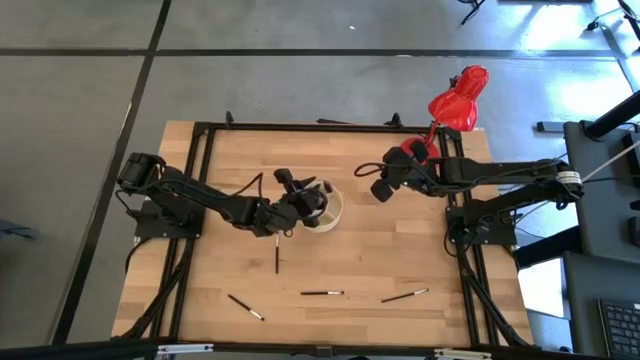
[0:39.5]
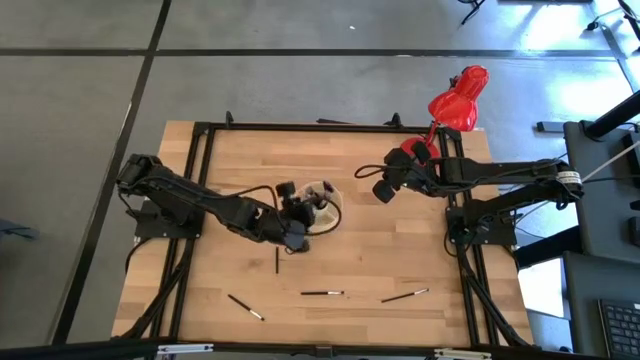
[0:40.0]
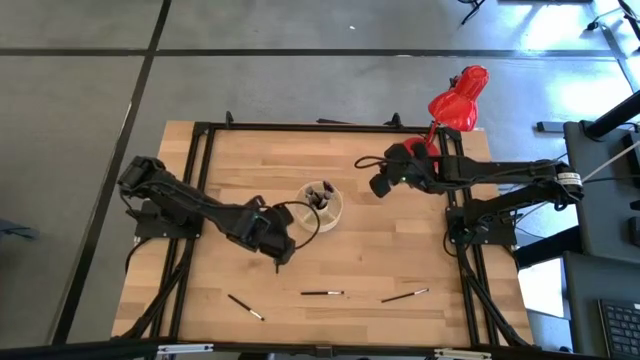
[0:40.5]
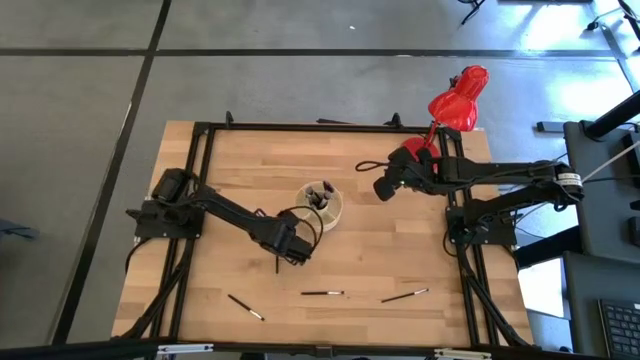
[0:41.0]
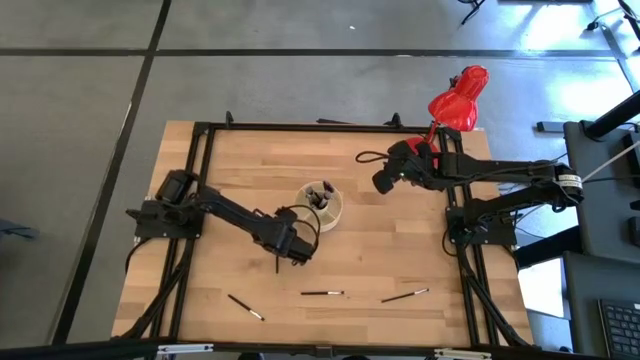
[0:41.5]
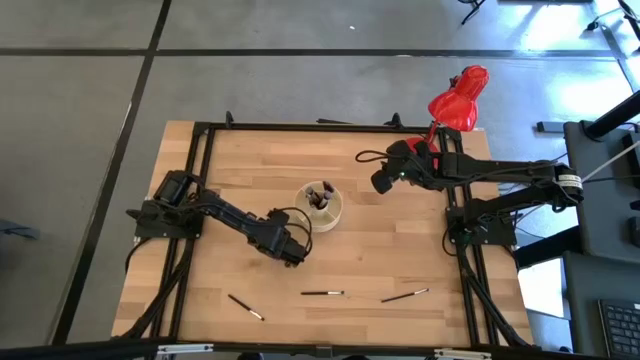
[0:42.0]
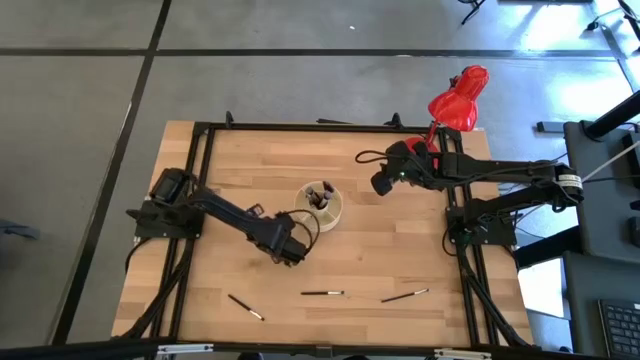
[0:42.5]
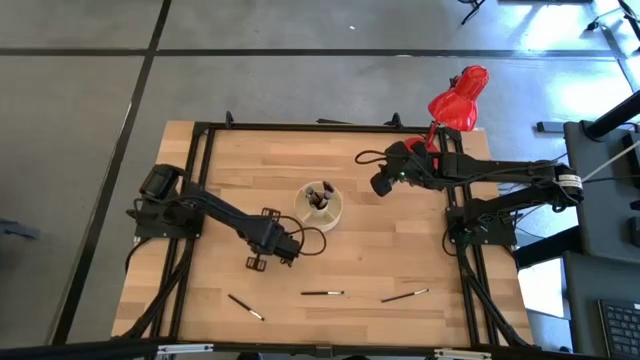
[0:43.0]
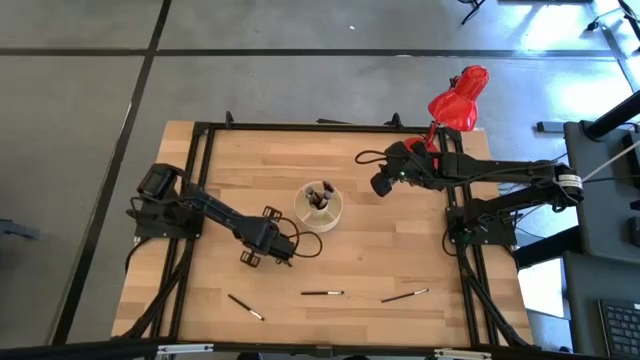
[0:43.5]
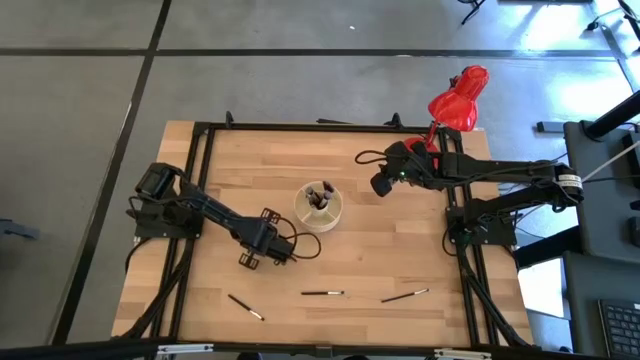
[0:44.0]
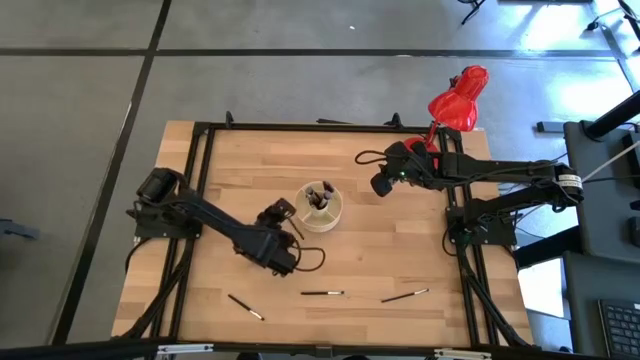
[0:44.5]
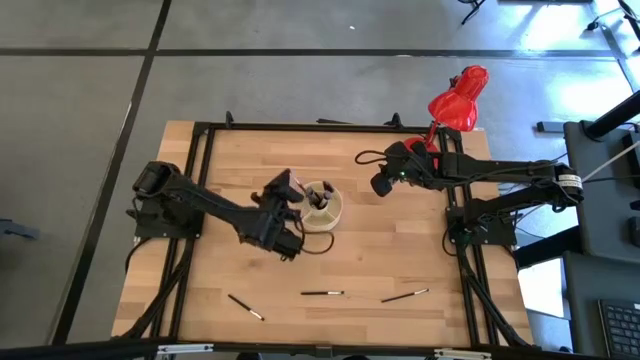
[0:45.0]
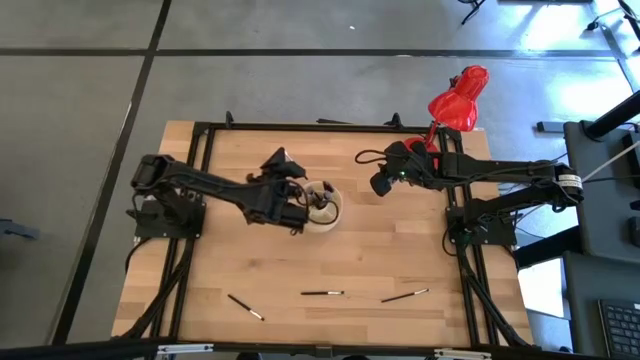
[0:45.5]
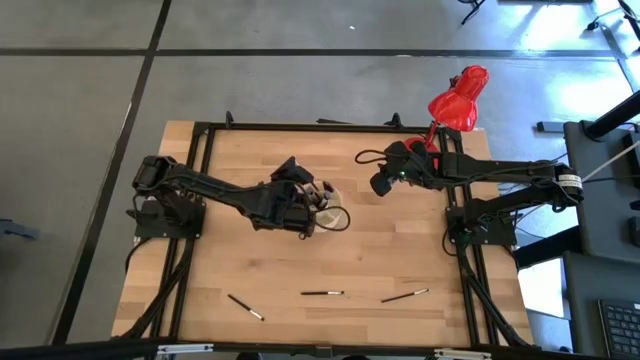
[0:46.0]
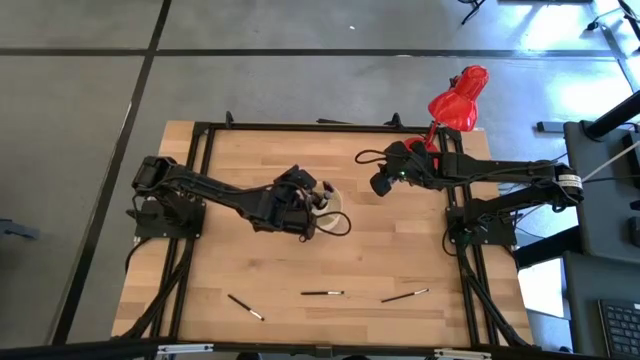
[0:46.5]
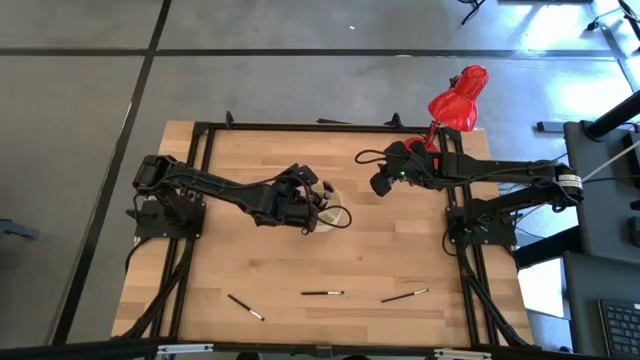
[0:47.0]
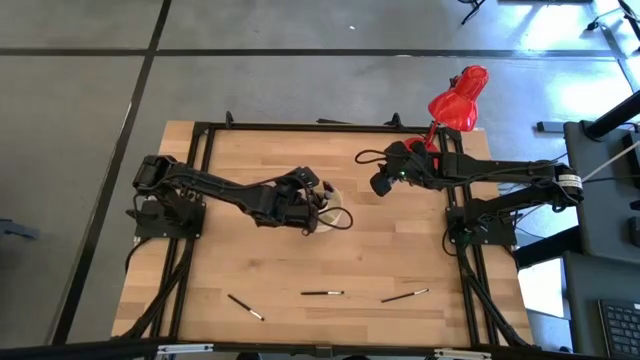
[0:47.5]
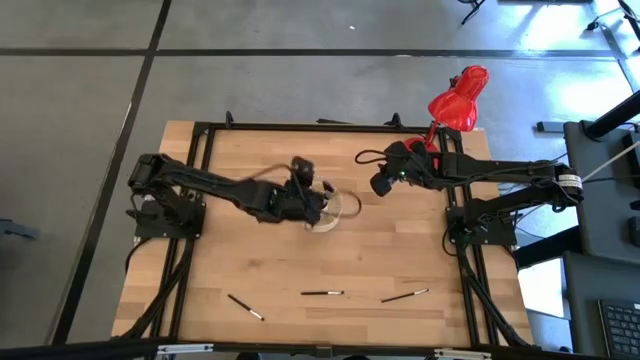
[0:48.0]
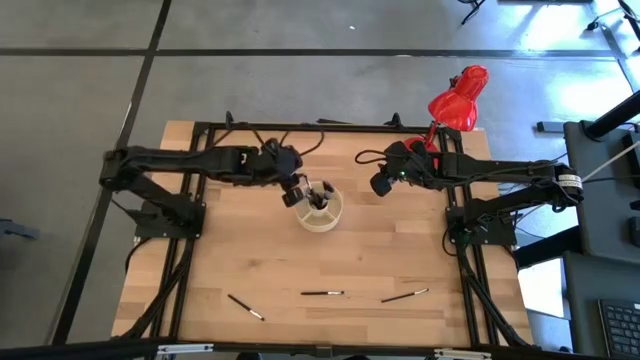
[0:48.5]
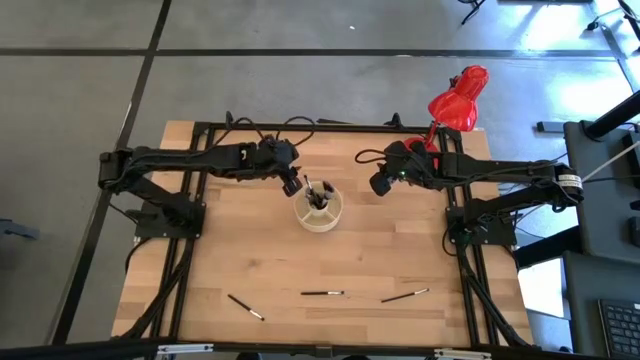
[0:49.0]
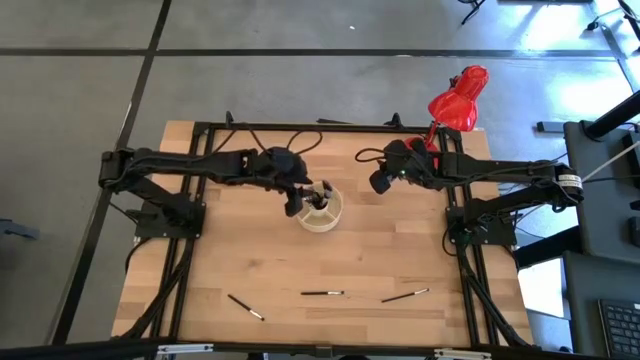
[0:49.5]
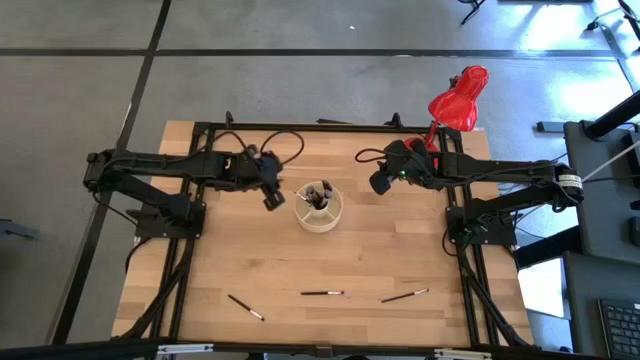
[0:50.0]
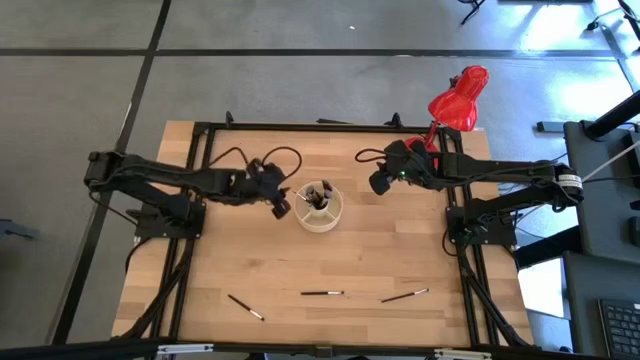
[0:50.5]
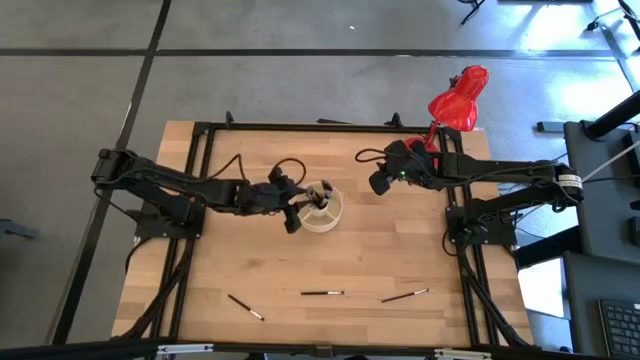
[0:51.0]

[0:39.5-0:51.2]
Task: Put items in baskets/containers
Put the eyeshadow brush into the white organizer

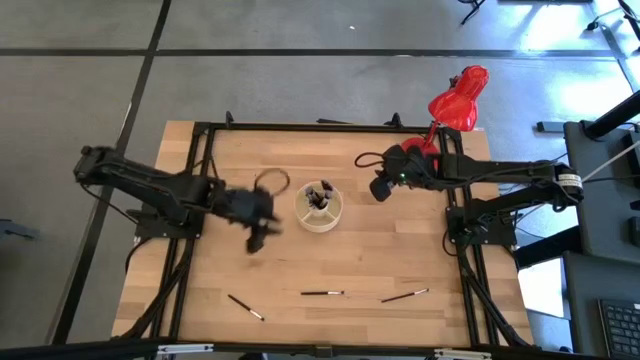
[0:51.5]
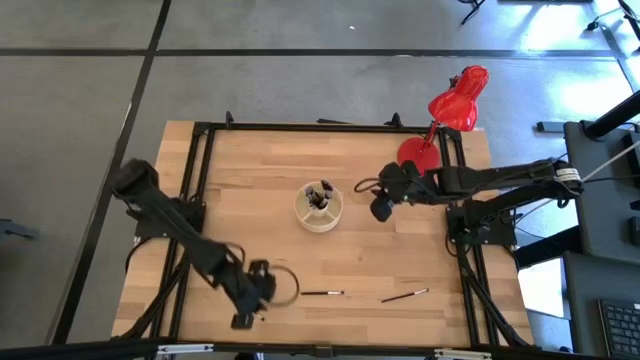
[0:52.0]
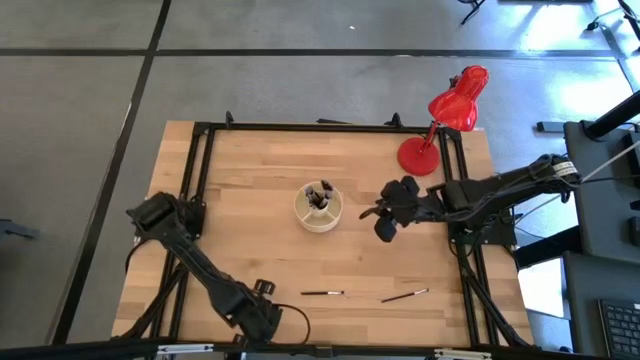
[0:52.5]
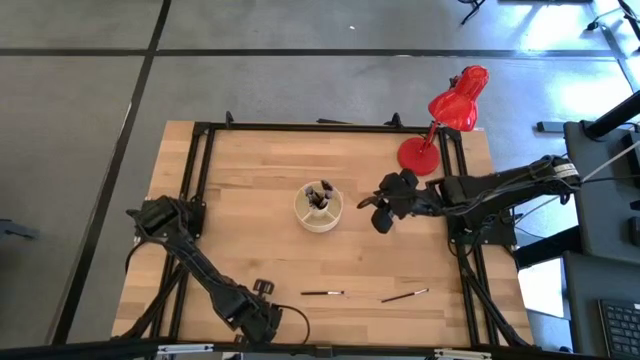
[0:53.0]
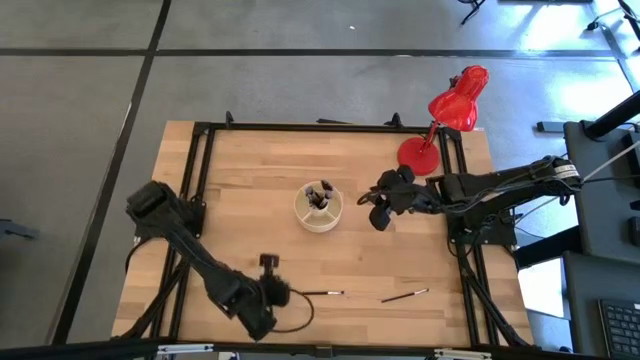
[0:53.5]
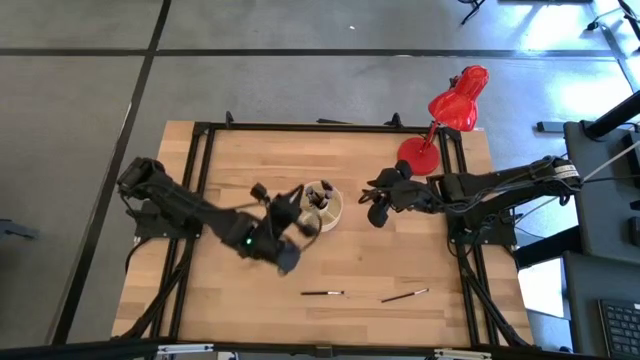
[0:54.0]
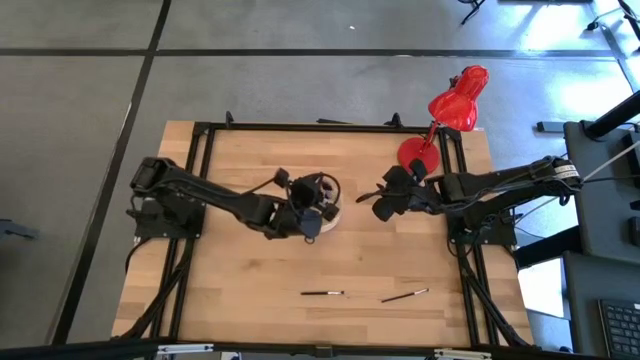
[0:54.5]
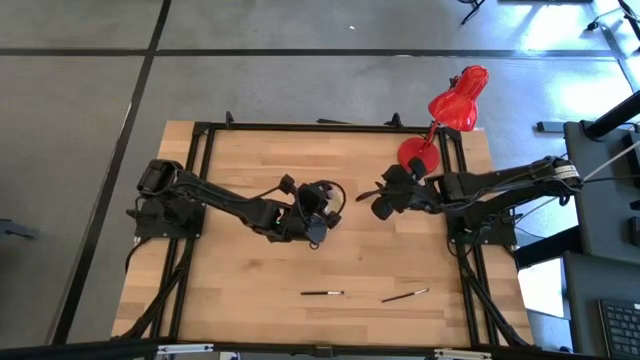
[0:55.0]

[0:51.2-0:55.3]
Put the eyeshadow brush into the white organizer

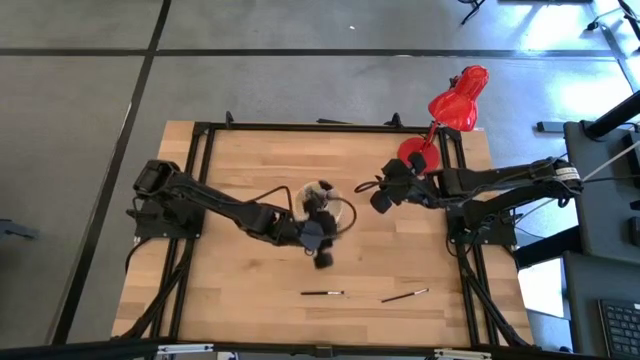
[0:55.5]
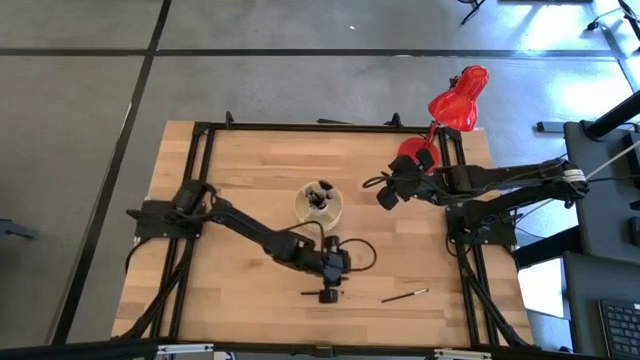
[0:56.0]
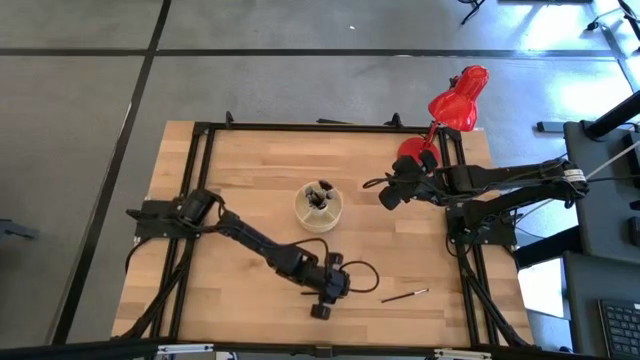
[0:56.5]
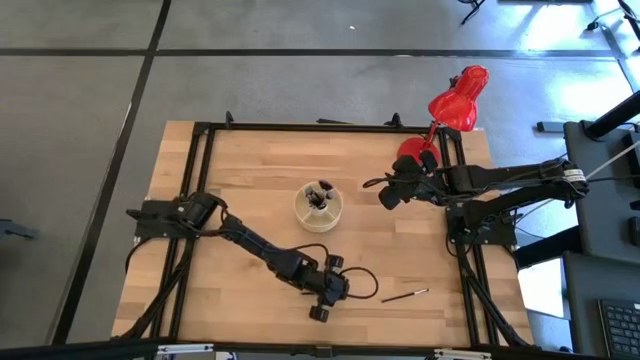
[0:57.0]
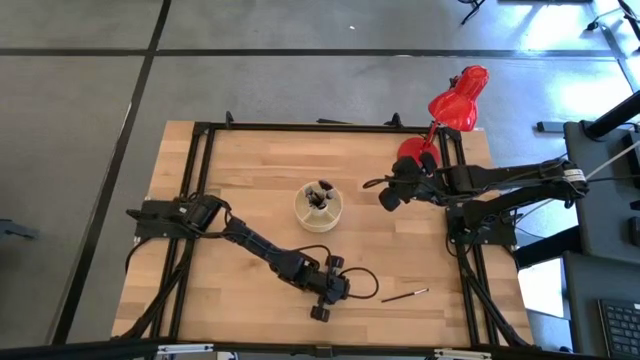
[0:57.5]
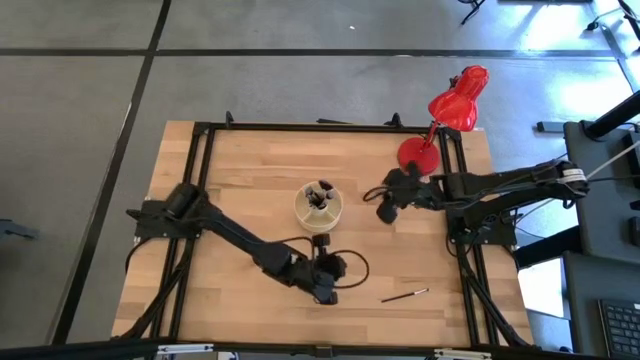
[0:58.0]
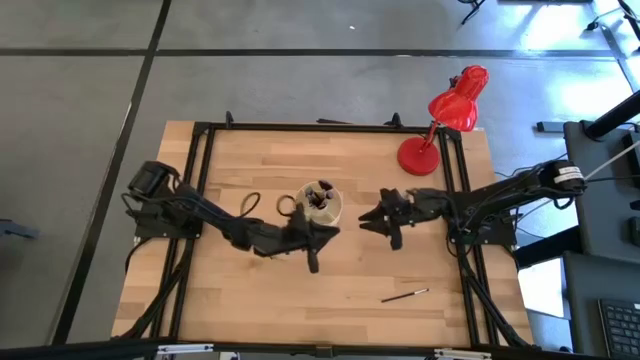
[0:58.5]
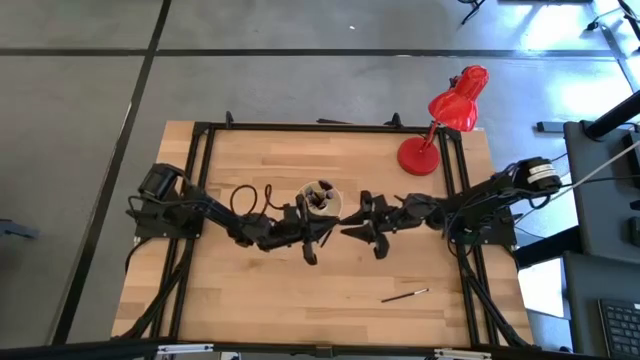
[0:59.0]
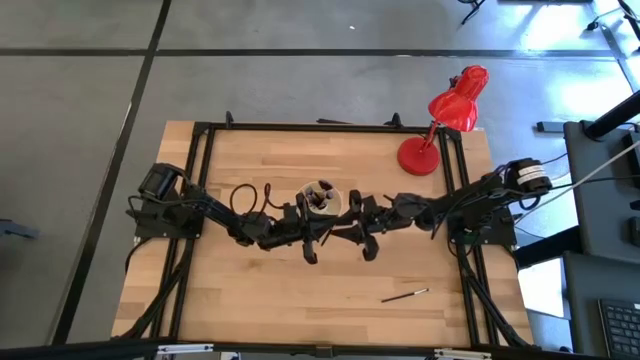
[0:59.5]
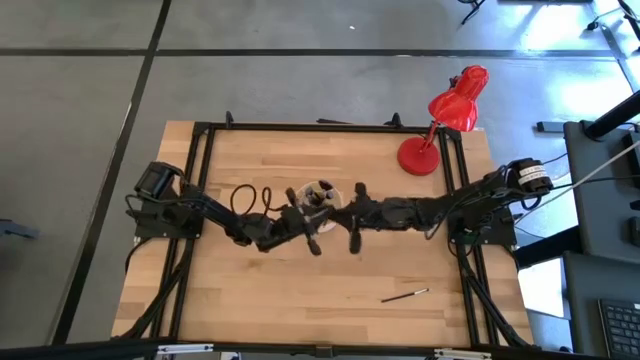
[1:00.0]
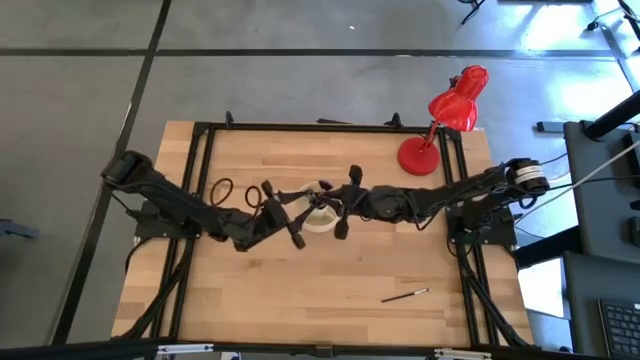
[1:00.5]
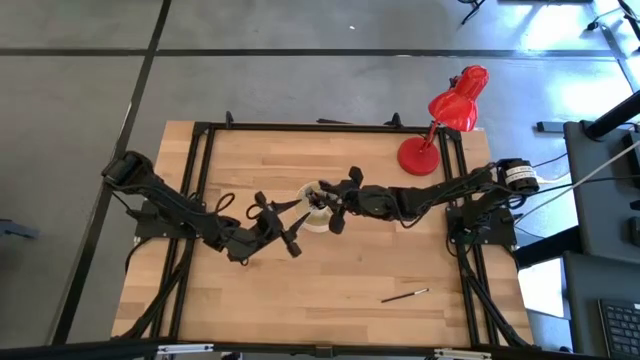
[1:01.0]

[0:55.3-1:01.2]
Put the eyeshadow brush into the white organizer
